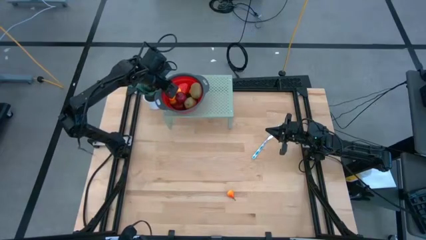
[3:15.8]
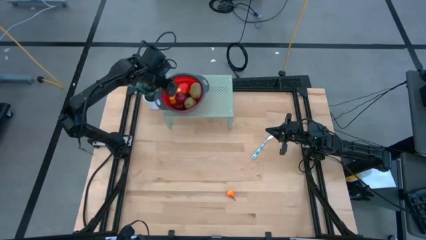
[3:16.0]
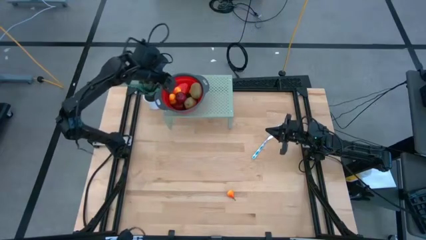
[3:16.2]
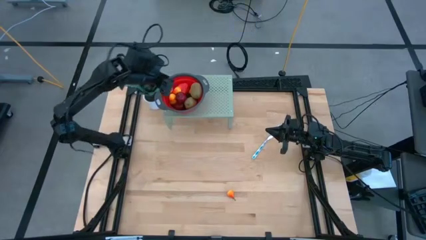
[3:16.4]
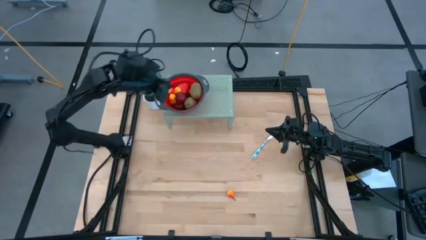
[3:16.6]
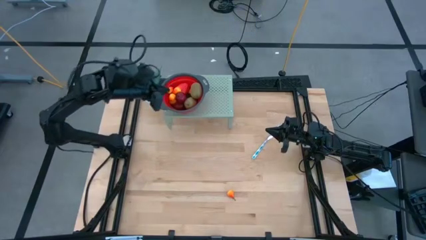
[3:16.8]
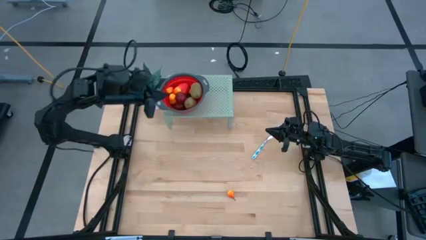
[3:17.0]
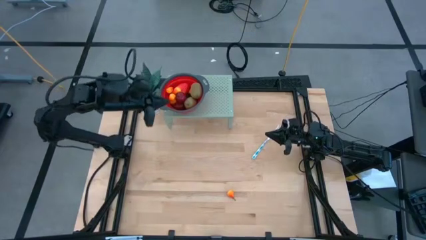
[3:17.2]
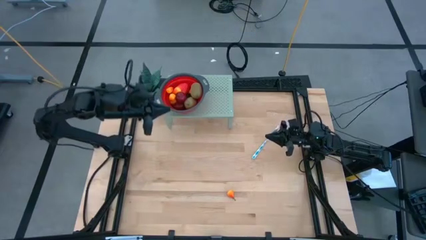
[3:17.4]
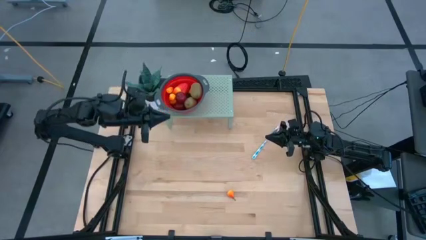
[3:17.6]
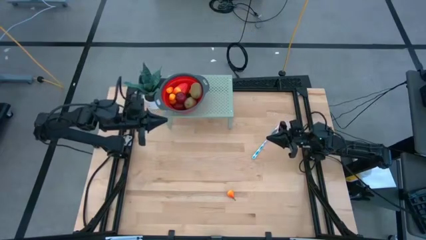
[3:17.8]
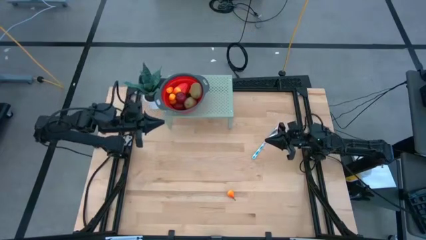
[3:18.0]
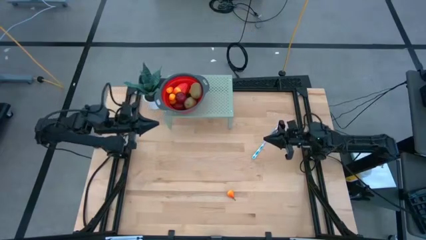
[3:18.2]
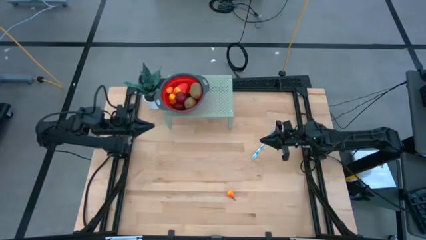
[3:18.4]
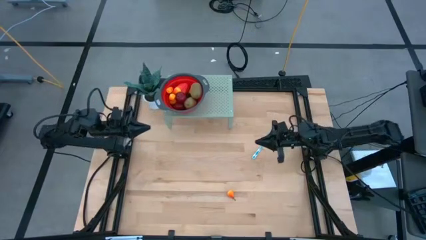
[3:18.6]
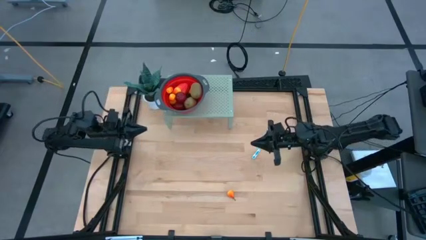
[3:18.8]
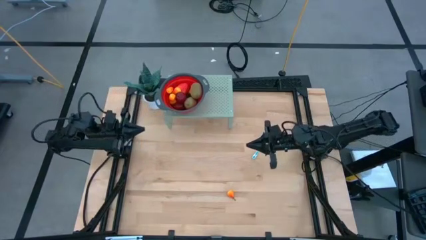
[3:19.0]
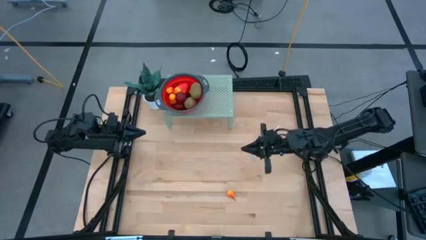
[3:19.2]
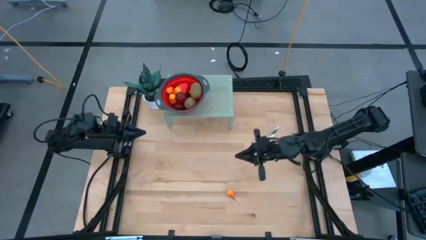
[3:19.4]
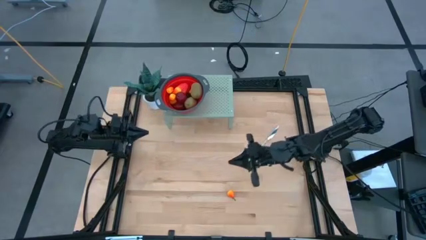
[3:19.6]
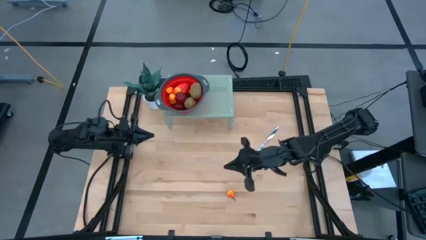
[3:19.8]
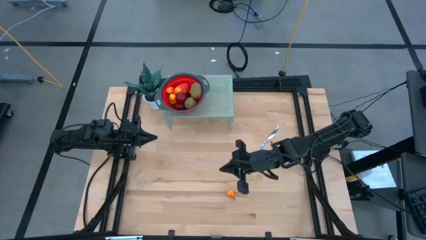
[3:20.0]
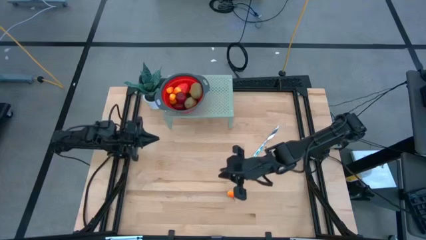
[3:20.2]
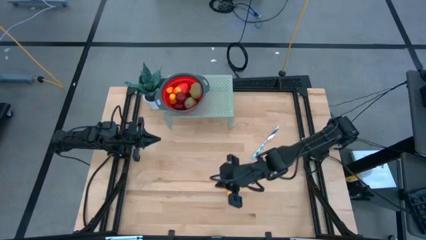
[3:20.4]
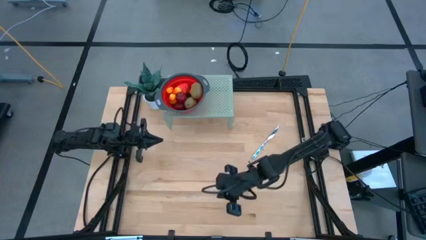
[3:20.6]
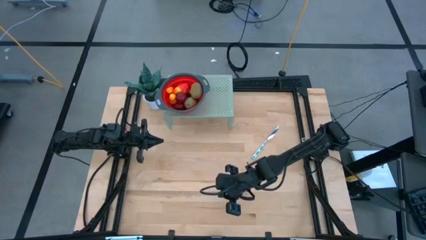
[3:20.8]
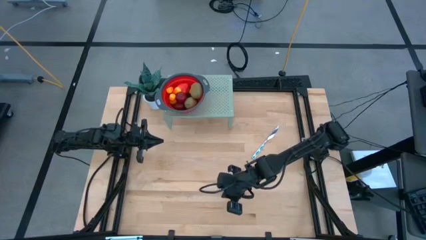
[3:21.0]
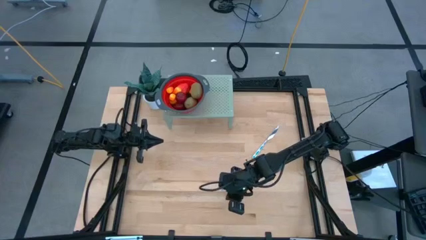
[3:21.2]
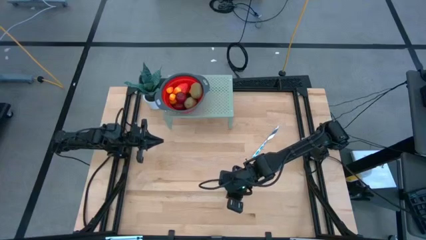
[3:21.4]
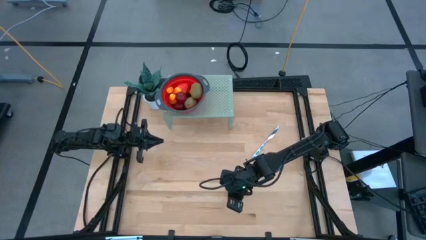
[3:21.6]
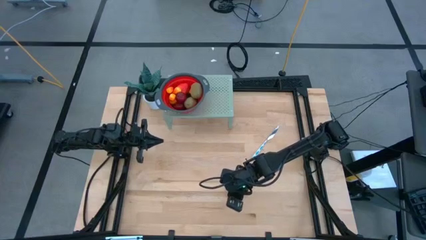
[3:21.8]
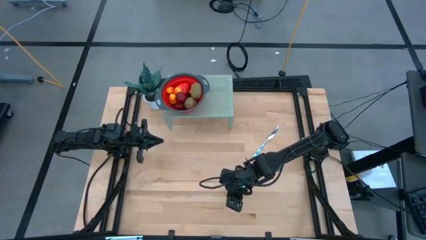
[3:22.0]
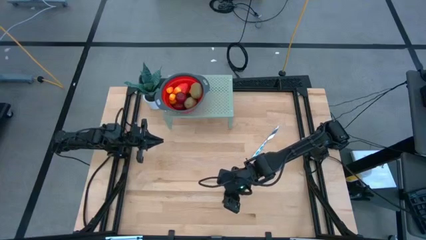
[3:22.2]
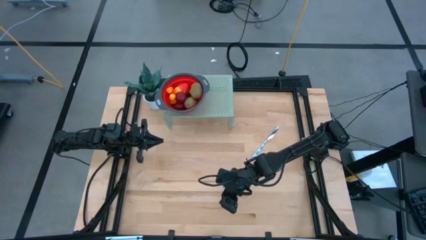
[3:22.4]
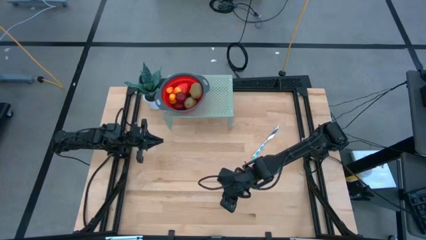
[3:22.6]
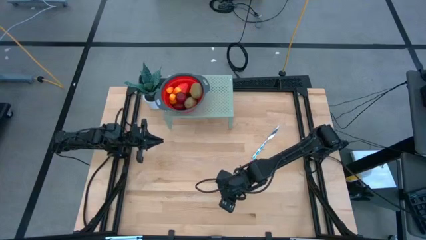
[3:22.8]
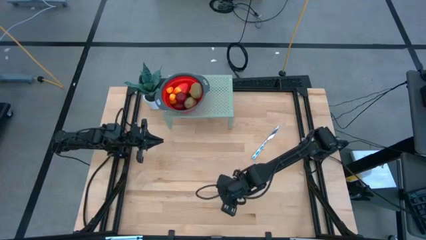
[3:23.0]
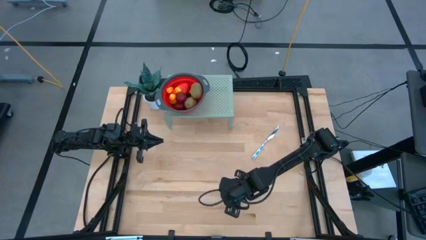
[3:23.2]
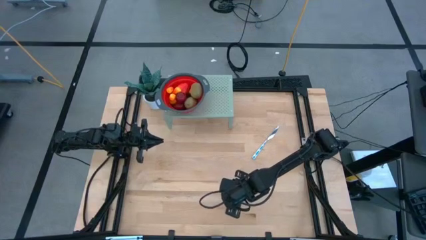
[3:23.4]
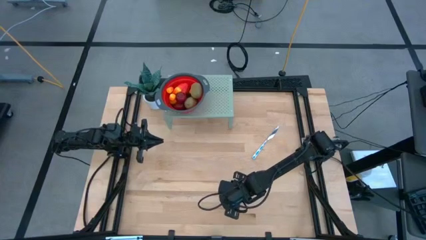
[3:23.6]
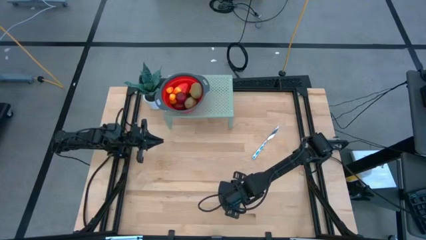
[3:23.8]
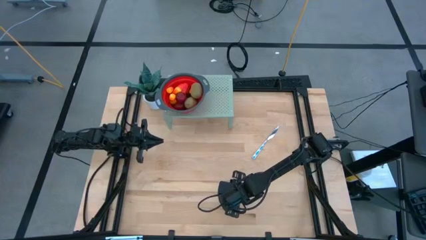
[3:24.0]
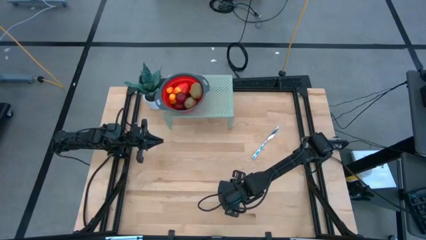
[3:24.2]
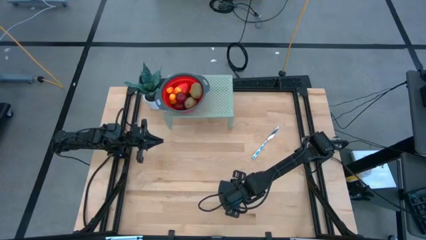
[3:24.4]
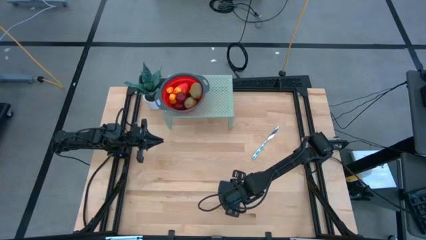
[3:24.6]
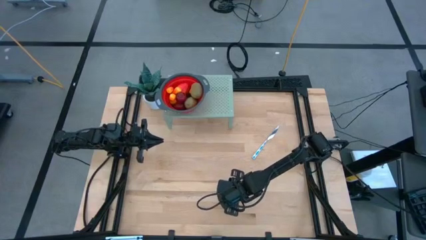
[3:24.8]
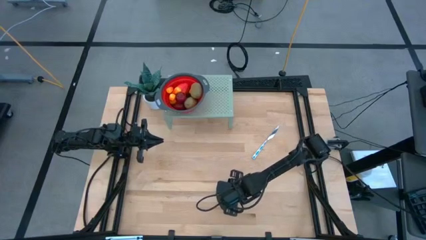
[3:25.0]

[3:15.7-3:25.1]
Task: Pick & Place Fruit
Put the pear into the red strainer bowl on the shelf

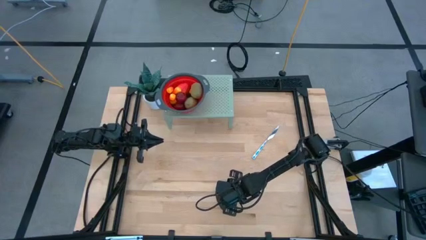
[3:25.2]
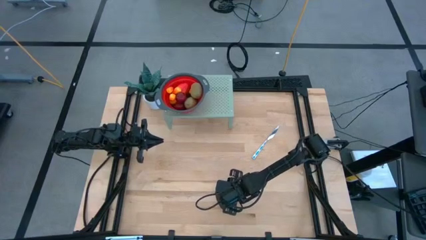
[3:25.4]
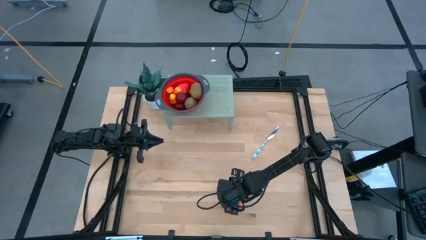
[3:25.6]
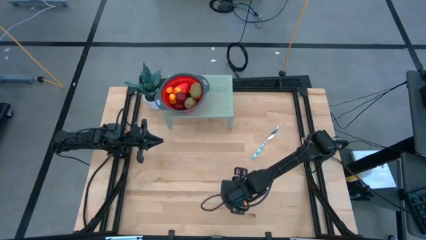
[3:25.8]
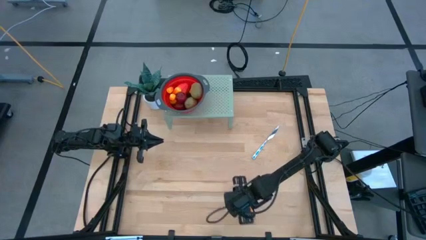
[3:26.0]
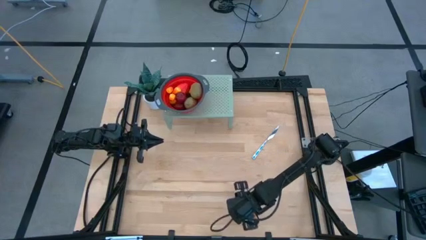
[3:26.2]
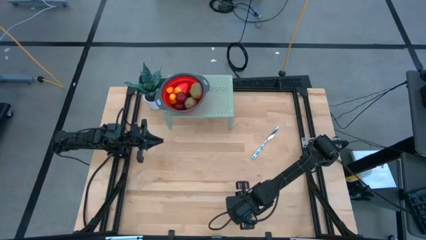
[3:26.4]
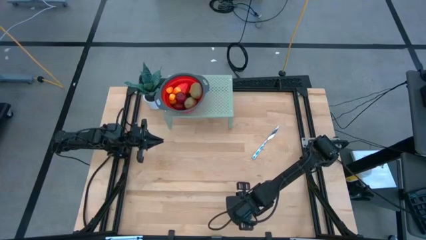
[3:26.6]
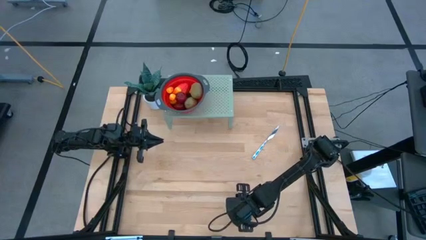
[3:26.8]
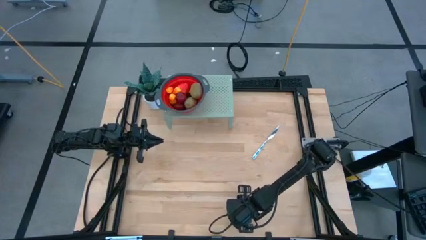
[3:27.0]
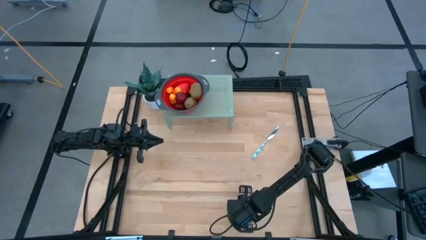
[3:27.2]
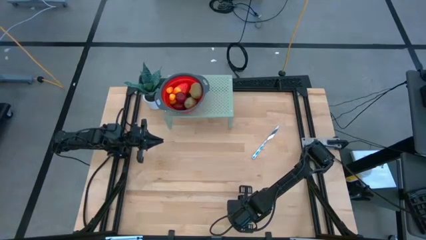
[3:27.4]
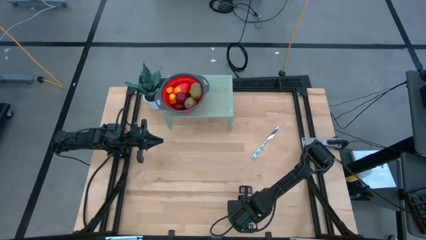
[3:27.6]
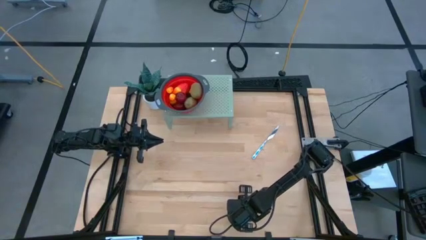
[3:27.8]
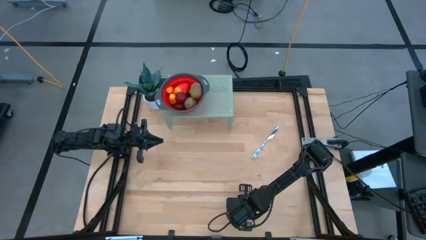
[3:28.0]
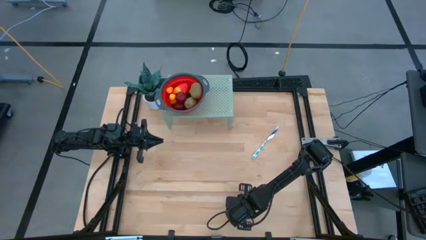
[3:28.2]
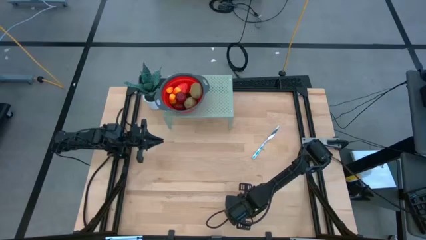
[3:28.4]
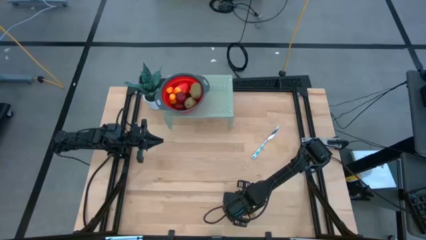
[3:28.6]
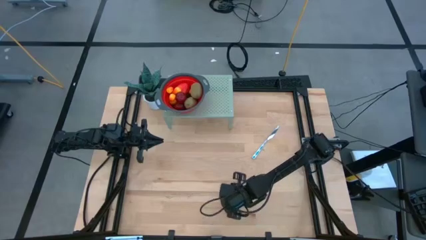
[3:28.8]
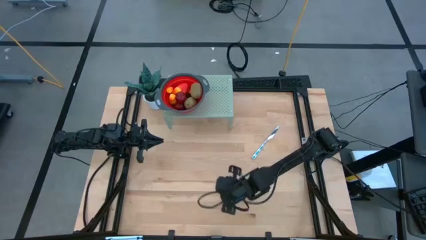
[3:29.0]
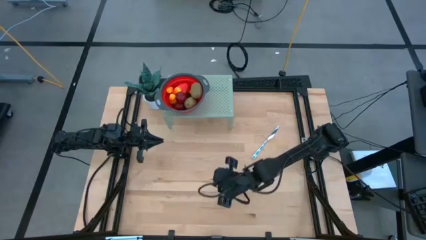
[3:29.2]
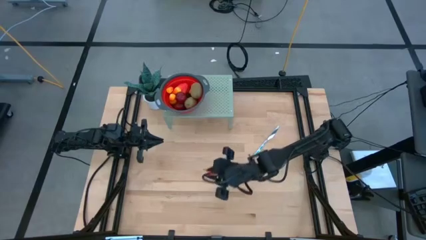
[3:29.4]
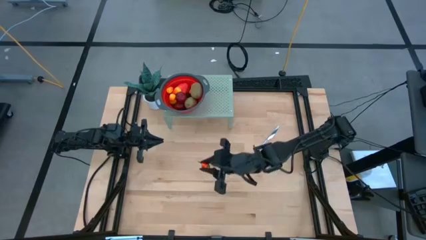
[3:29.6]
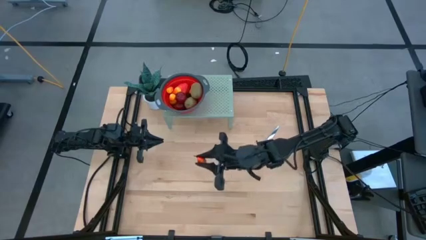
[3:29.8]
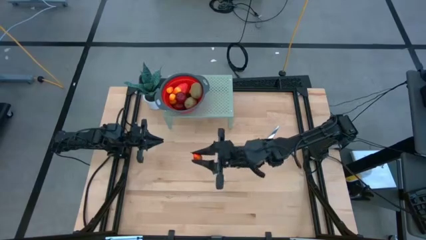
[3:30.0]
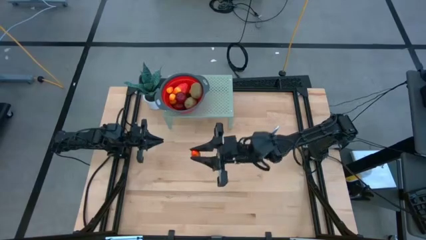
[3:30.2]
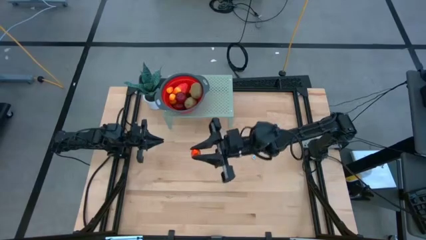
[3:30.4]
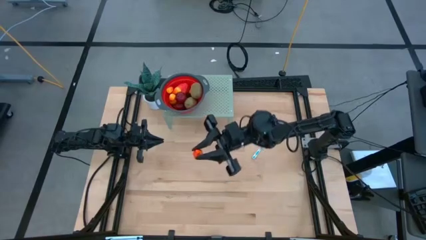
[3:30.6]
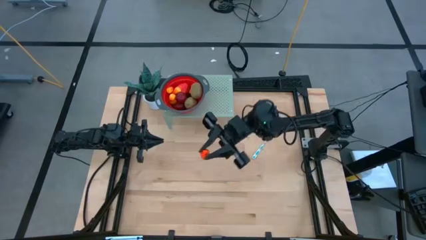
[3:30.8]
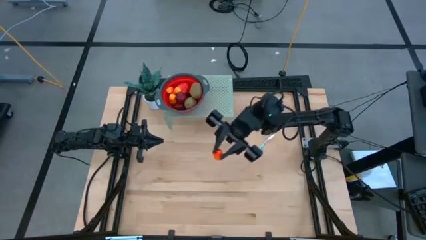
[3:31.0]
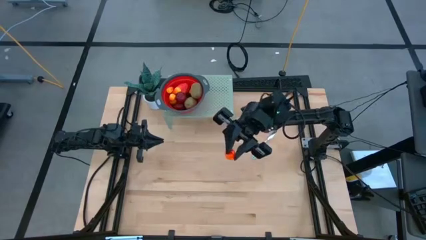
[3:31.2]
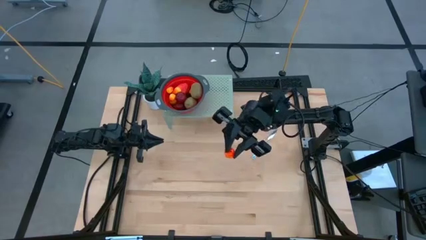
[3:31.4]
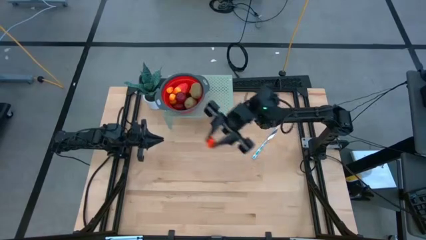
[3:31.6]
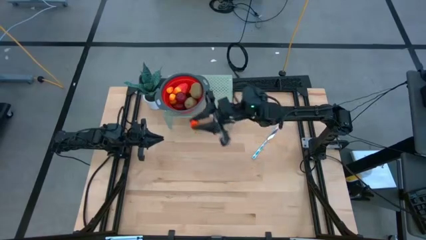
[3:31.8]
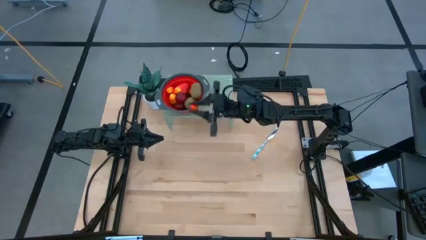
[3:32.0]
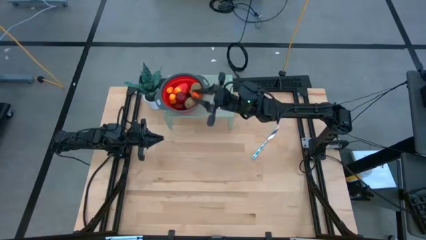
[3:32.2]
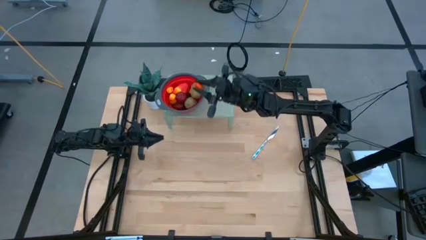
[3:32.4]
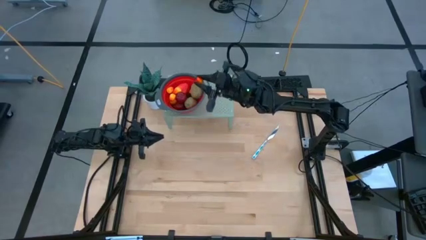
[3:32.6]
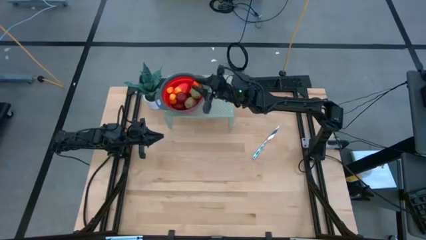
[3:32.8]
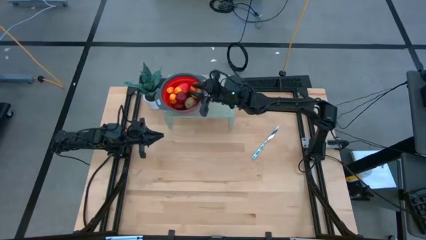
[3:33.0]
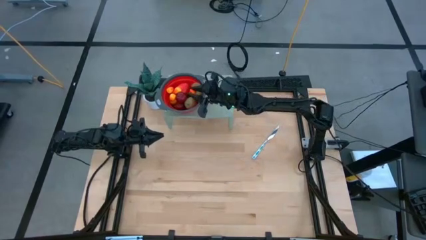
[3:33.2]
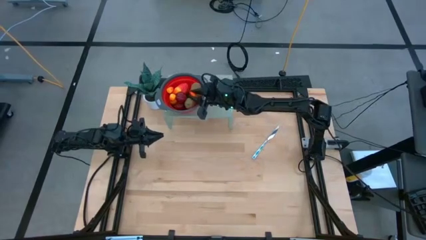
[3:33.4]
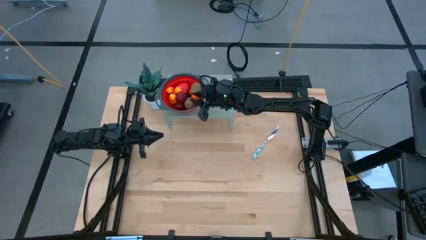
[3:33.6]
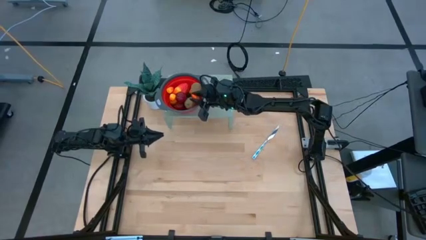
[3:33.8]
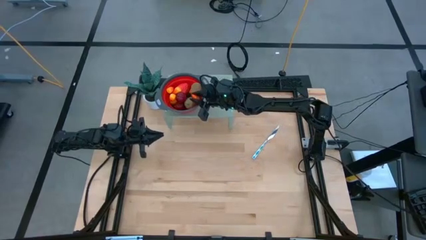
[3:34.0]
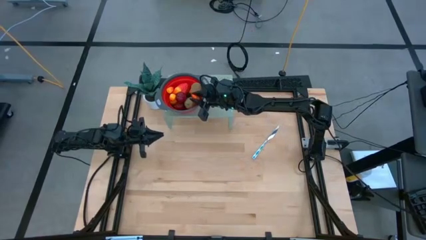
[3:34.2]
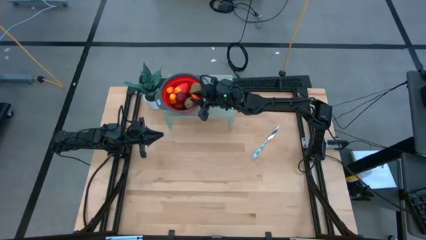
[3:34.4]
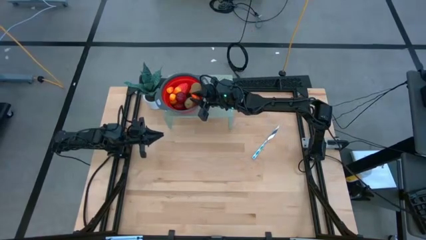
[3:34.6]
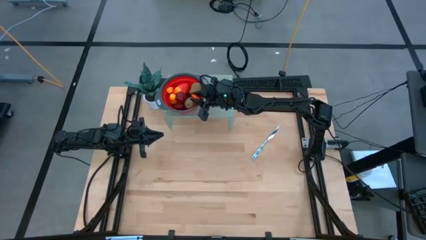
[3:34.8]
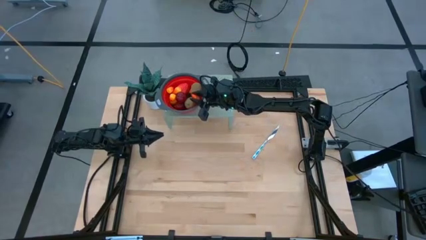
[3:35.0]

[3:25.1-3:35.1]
Put the pear into the red strainer bowl on the shelf
